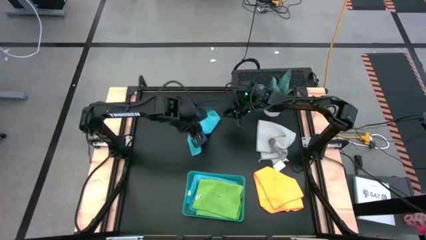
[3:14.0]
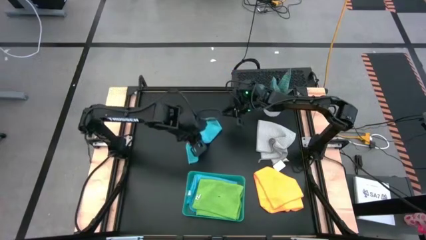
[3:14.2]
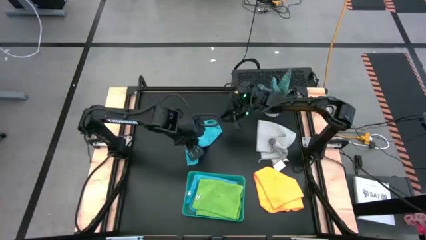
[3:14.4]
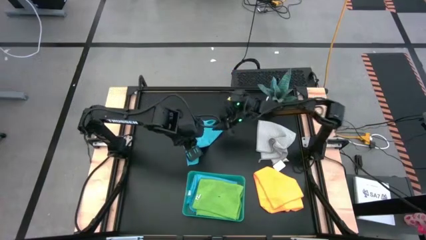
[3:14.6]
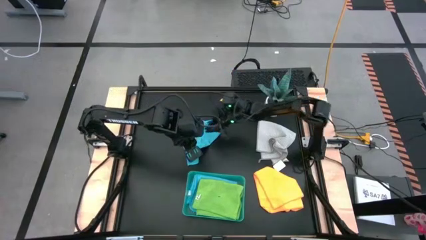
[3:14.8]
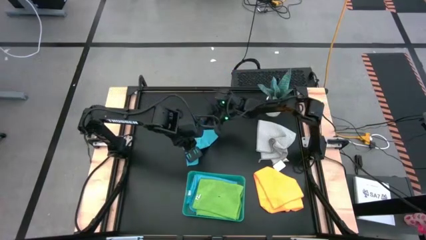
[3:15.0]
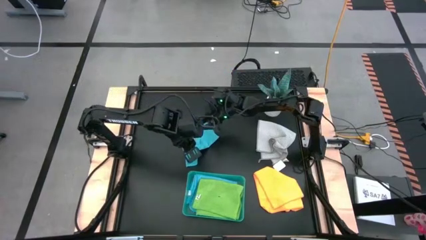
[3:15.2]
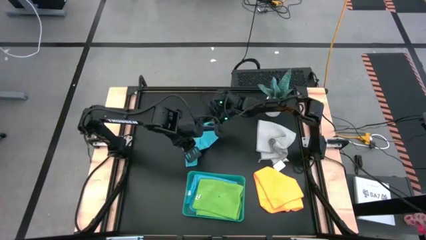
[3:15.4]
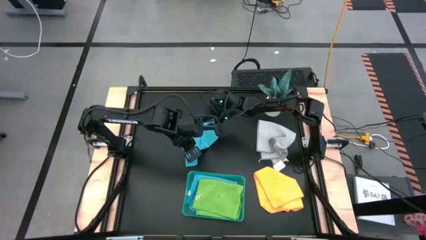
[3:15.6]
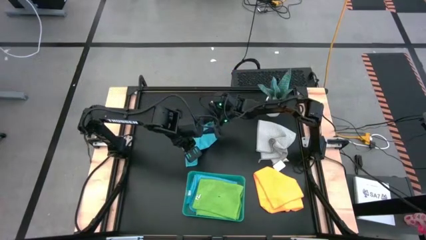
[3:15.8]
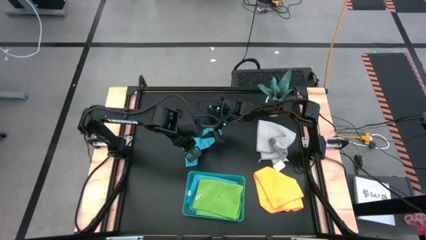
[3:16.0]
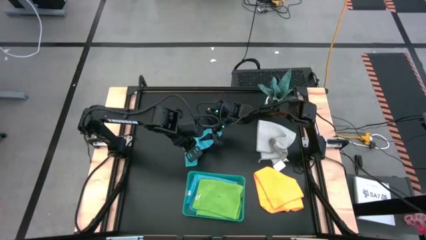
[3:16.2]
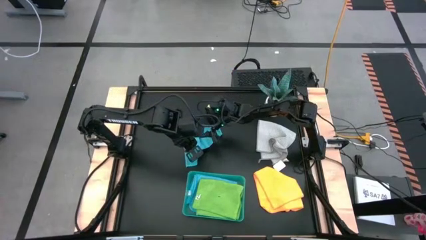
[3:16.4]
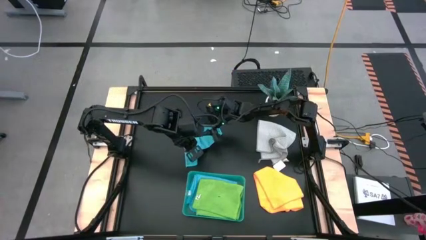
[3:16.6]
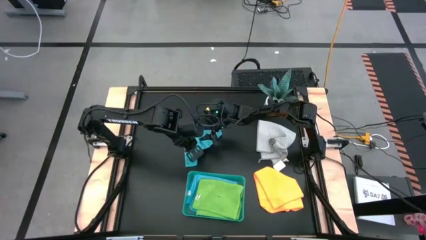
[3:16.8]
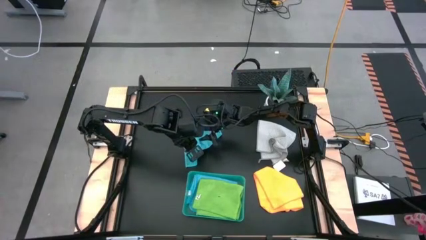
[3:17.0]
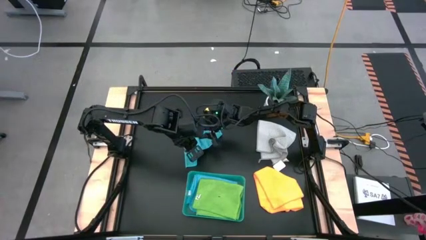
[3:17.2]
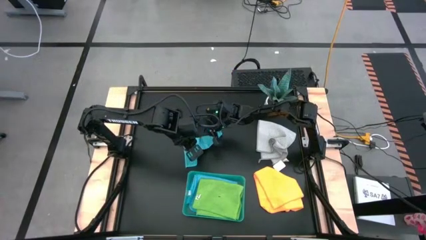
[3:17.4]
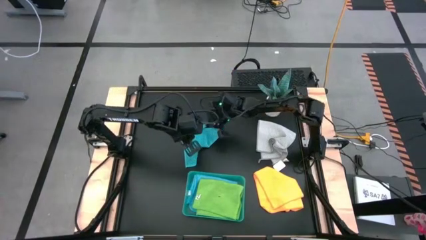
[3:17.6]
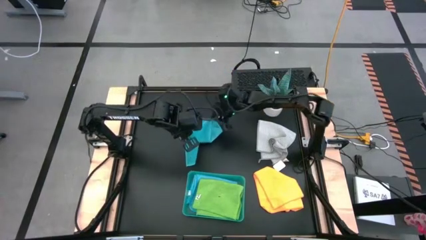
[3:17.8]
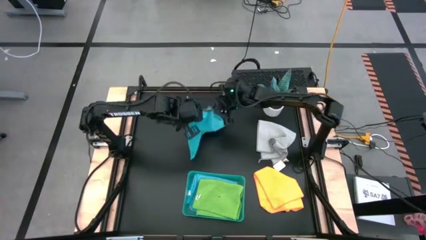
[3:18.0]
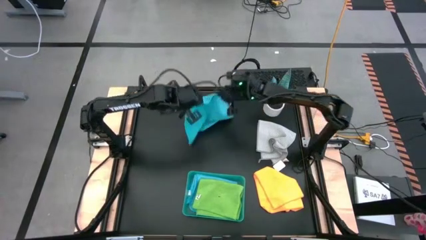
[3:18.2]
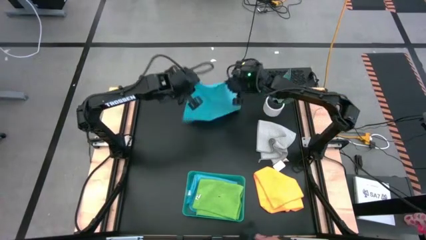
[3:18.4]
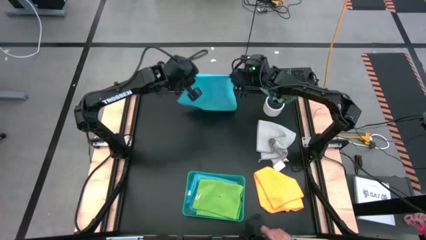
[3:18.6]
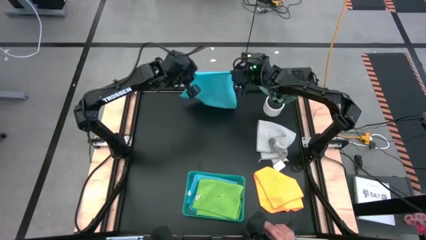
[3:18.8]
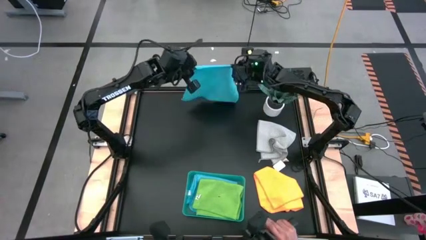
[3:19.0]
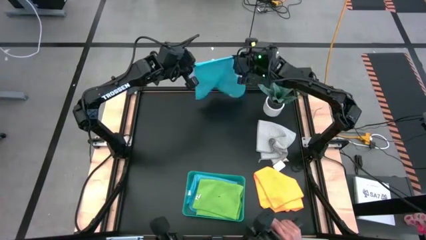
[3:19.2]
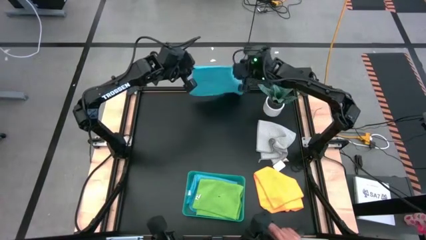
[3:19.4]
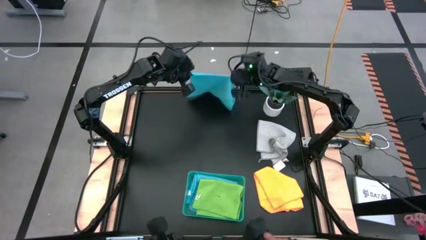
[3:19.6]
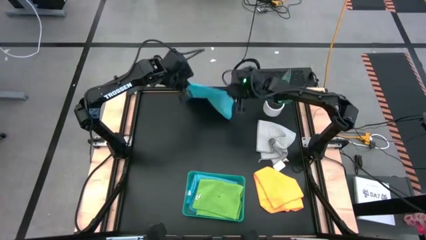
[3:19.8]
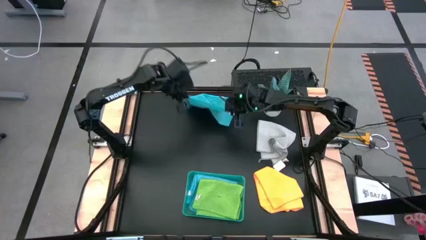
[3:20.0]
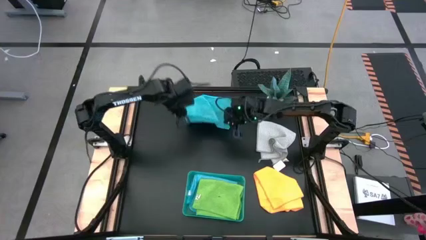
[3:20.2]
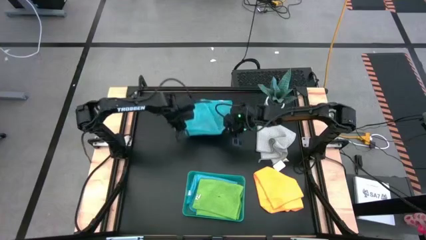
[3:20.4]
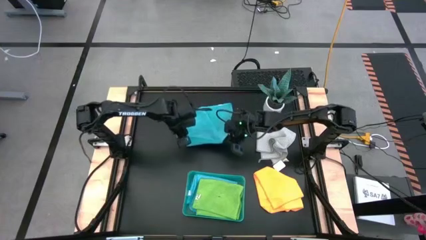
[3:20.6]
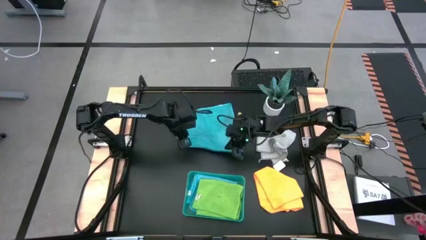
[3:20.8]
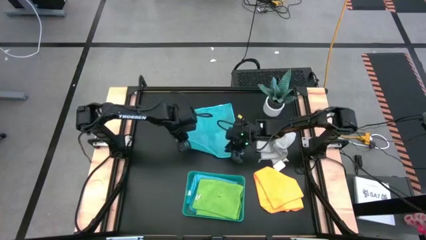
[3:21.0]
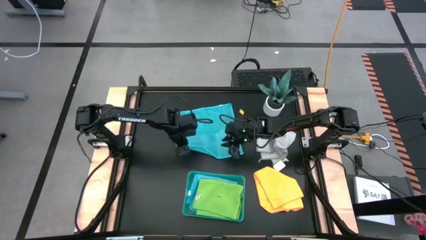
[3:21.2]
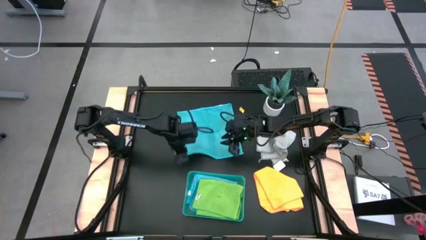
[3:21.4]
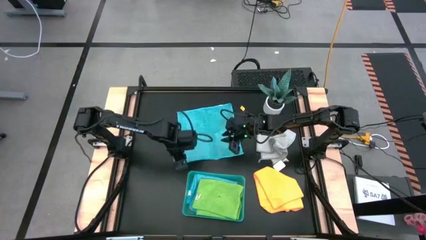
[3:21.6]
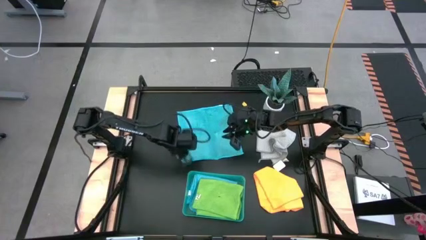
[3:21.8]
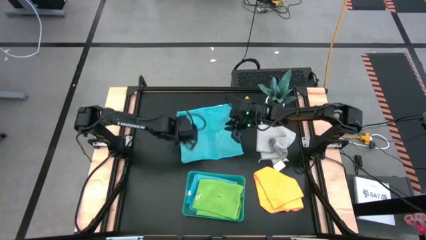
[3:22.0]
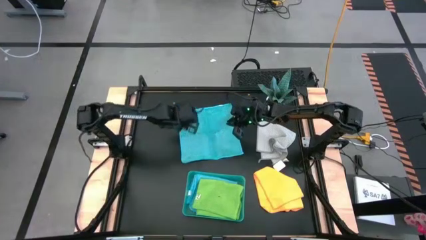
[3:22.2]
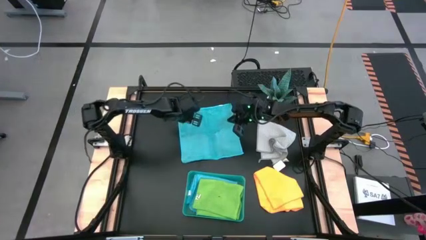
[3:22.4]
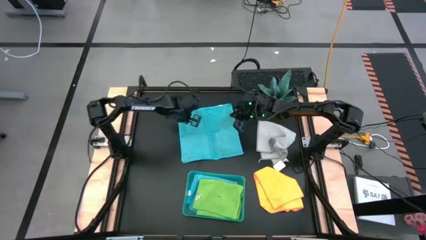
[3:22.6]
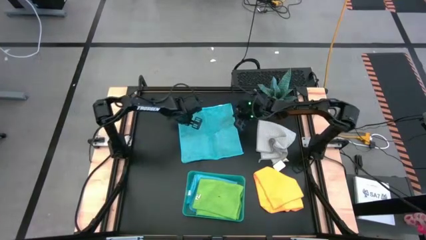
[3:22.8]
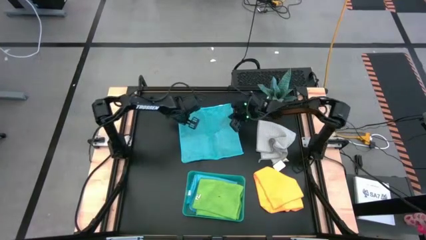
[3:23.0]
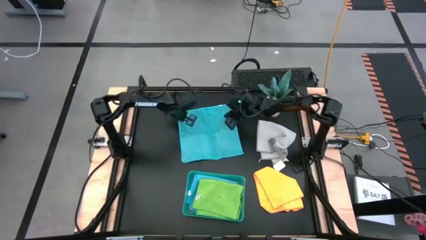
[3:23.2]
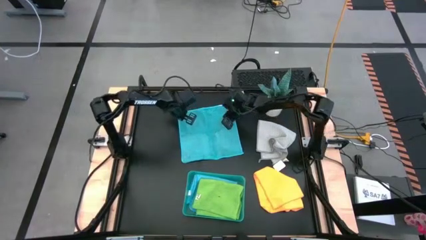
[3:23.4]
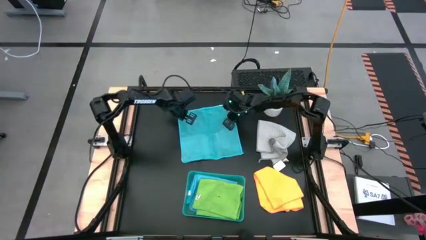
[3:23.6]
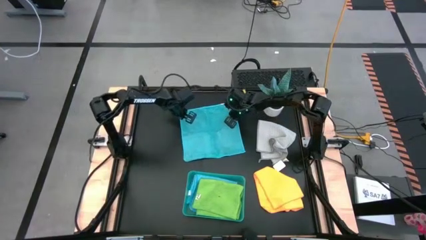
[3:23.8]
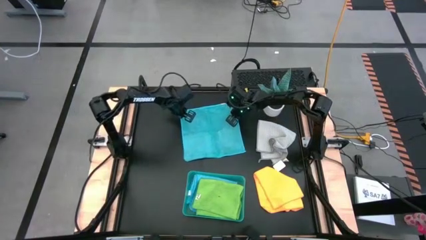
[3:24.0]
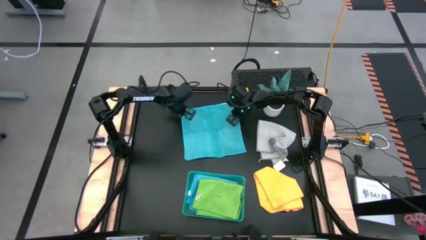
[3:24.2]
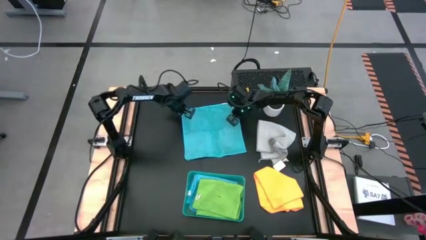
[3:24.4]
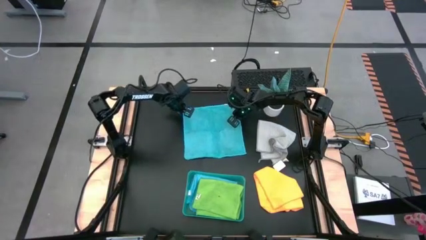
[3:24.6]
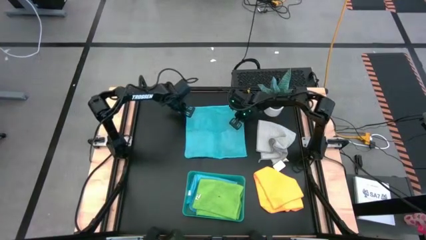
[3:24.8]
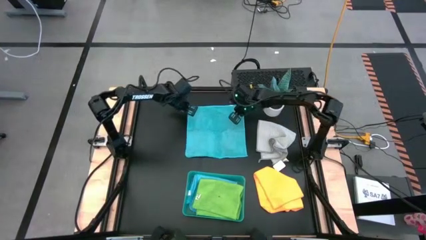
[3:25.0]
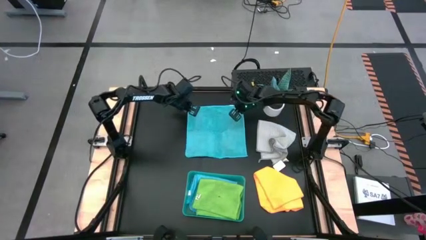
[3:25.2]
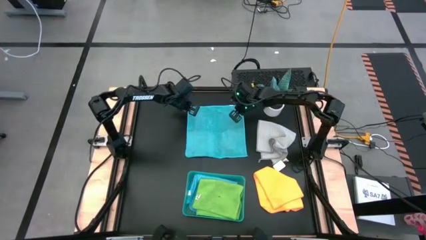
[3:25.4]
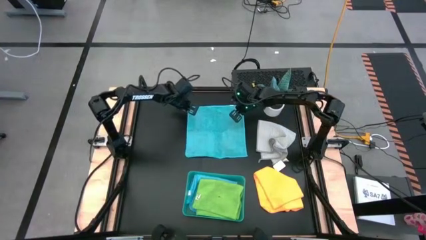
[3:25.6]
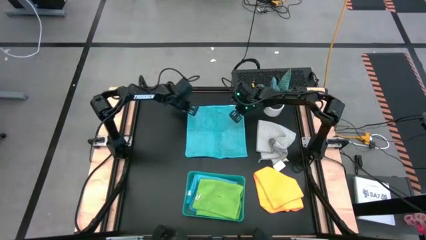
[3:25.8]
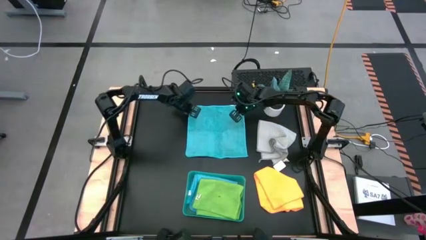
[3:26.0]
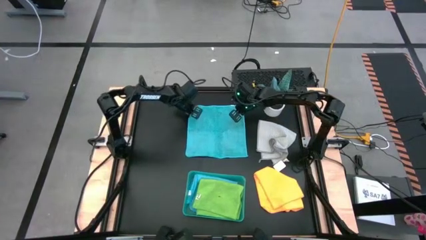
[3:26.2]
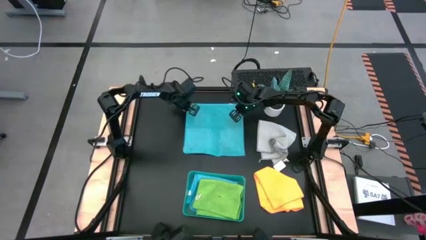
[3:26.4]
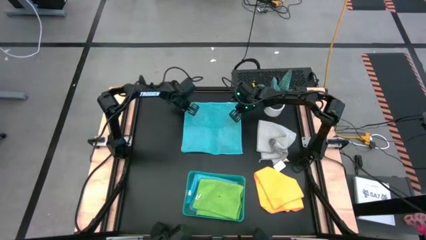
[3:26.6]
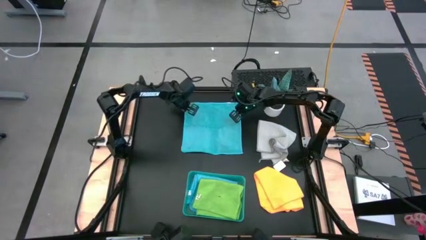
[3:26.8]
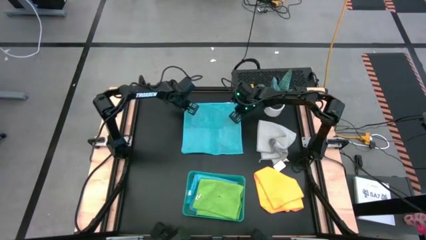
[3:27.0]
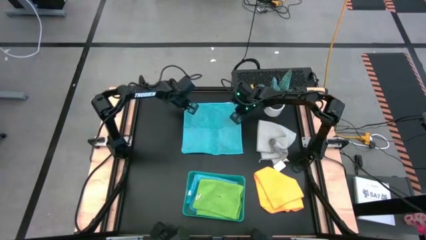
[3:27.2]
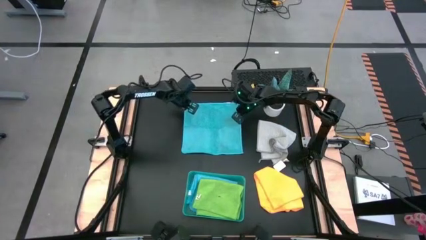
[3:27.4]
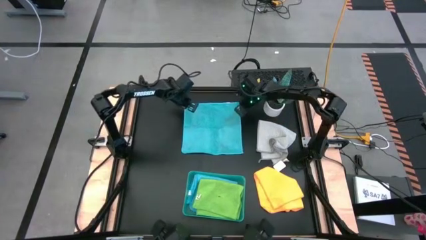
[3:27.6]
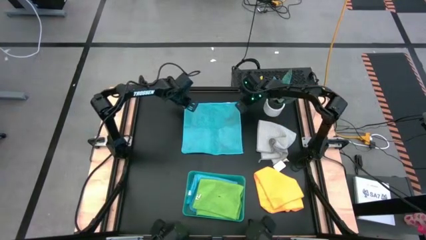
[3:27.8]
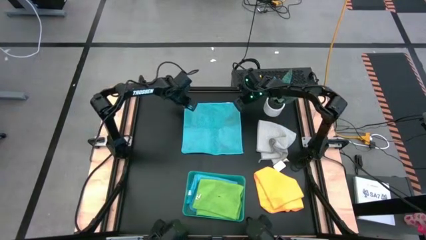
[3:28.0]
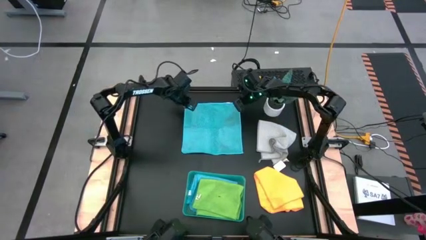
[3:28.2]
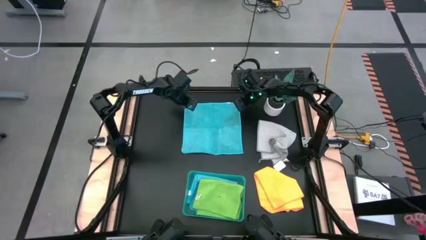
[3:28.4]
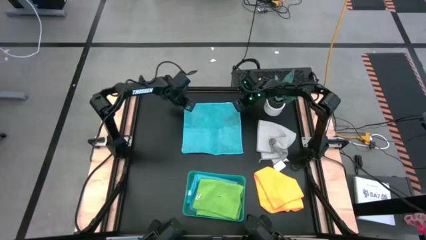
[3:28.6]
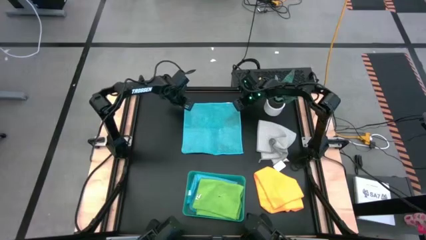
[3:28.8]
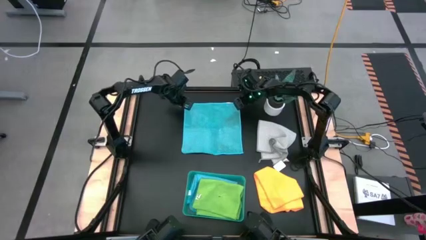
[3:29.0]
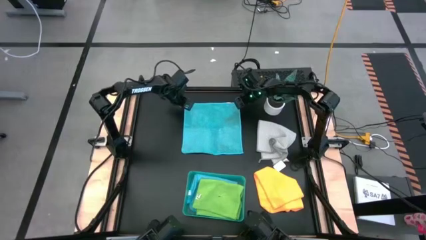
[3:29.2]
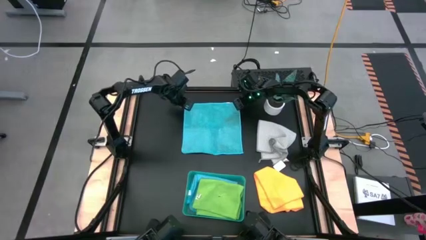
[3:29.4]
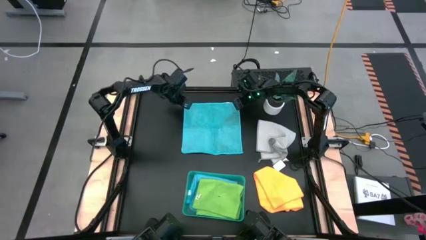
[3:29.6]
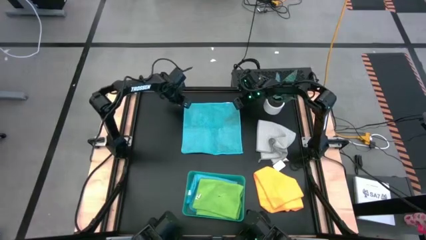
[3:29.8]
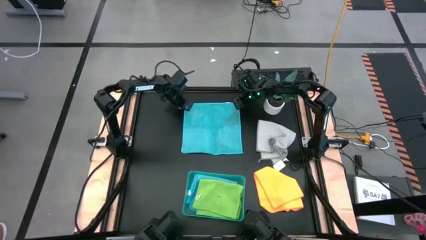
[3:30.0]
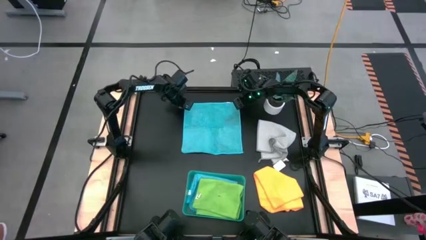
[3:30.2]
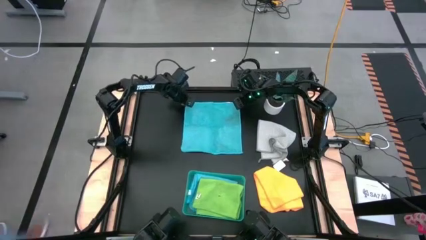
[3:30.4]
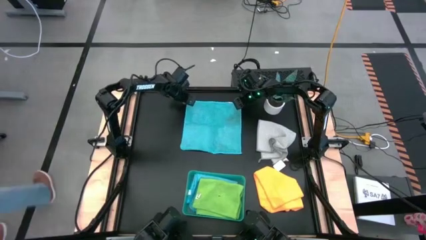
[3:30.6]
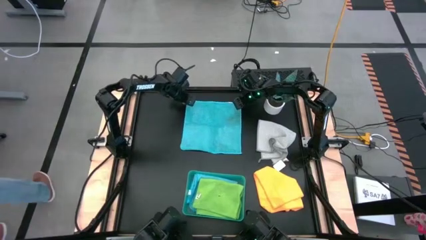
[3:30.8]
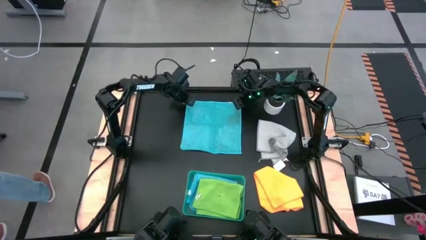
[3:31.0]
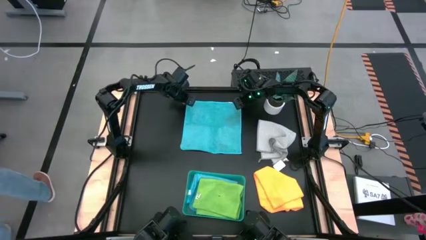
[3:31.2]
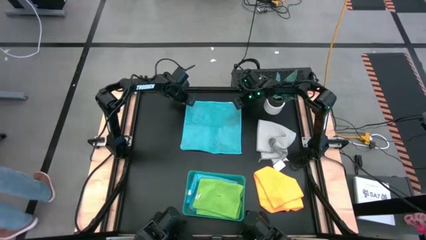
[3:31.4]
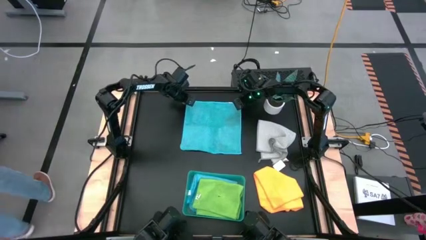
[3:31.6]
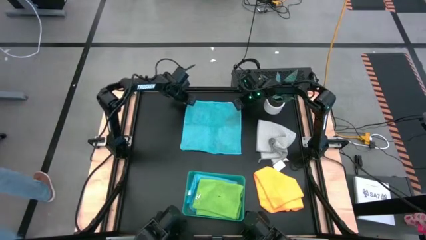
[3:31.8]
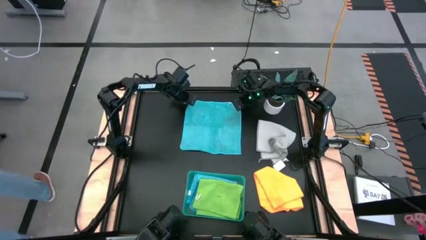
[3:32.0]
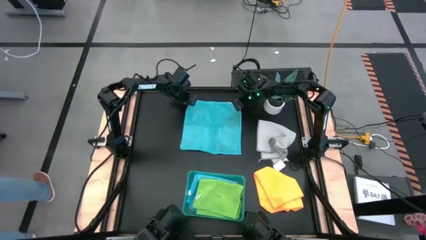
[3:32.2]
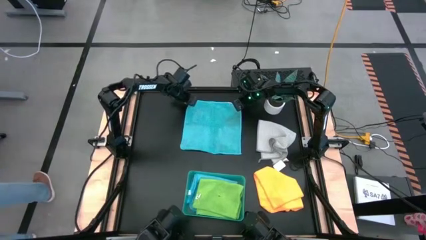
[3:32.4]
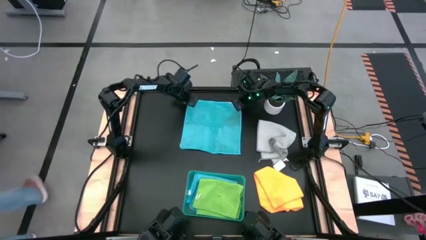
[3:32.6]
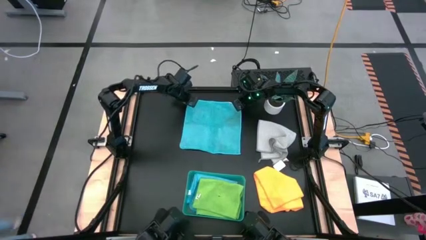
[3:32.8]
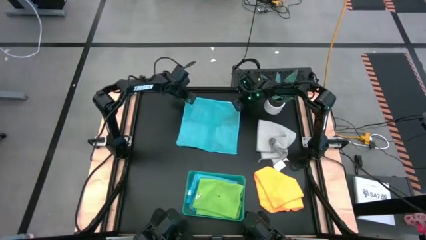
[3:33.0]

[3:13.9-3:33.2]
Task: Fold microfiber towels
Fold the blue microfiber cloth
